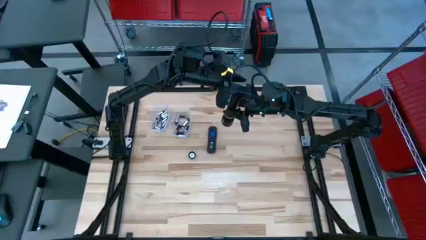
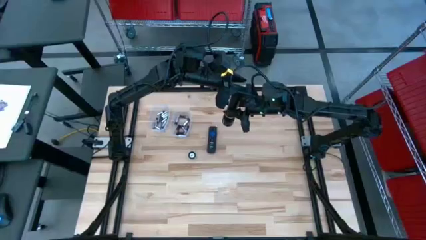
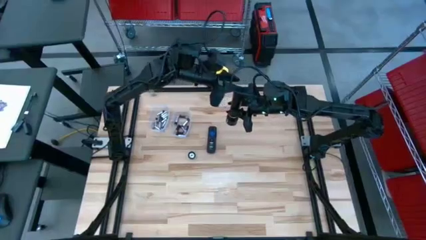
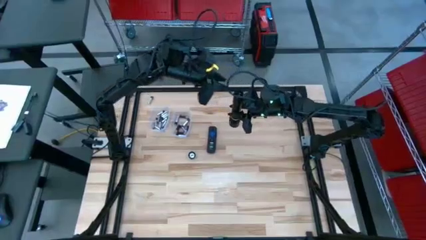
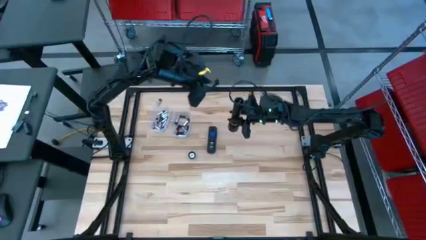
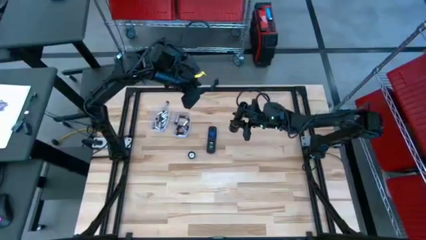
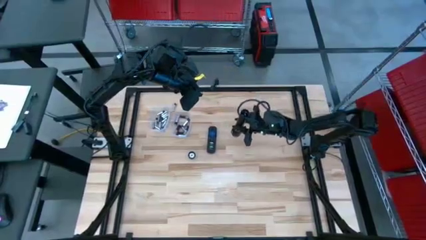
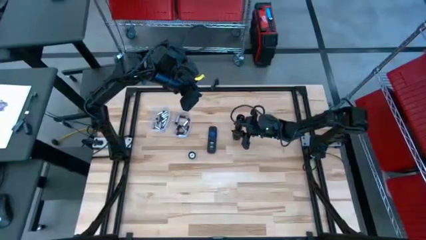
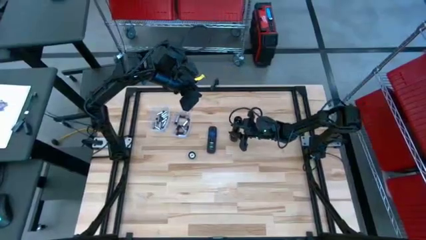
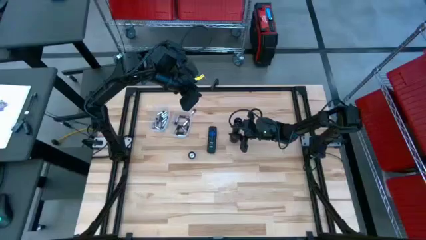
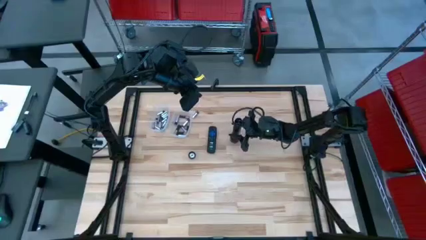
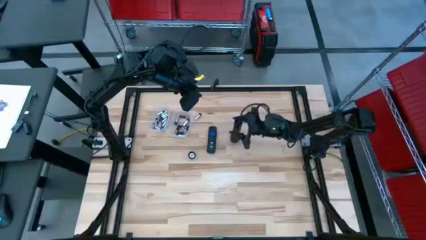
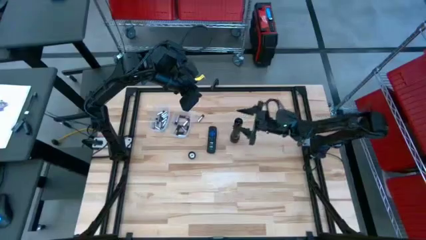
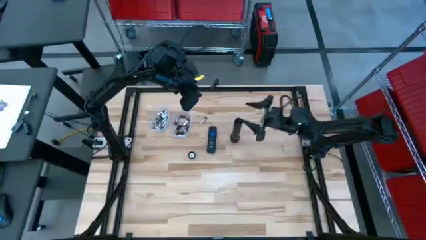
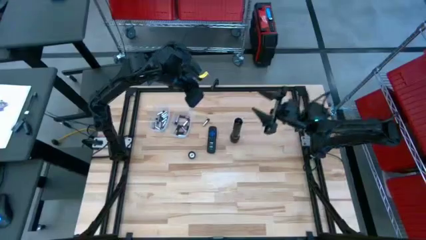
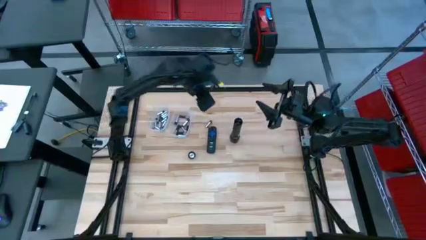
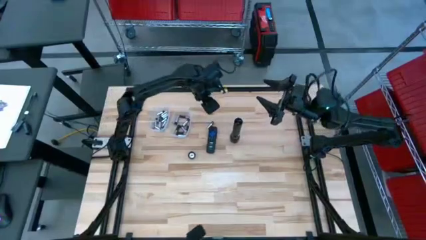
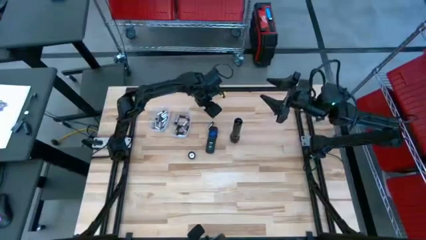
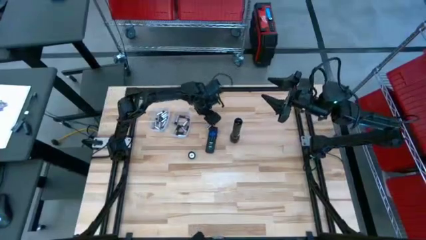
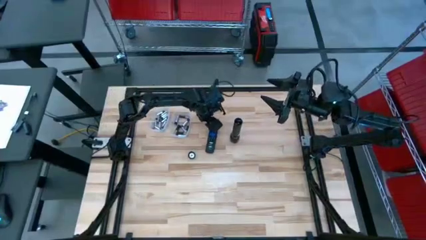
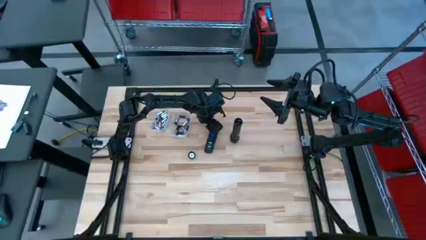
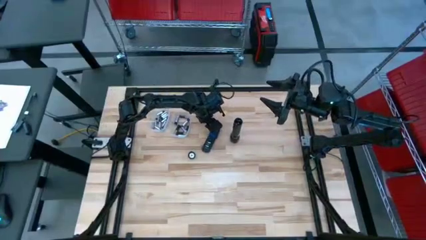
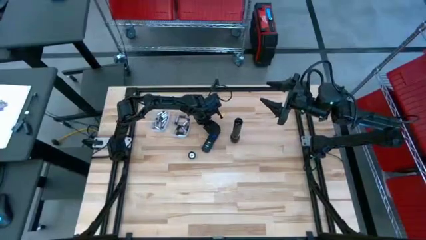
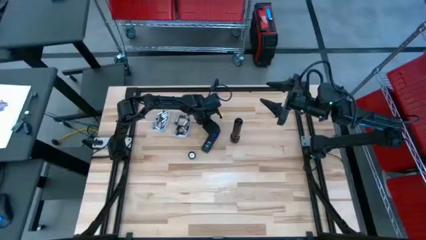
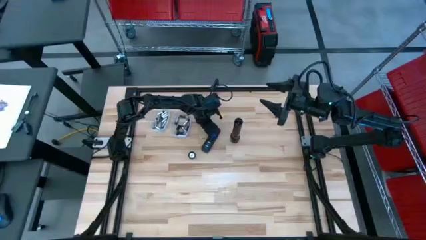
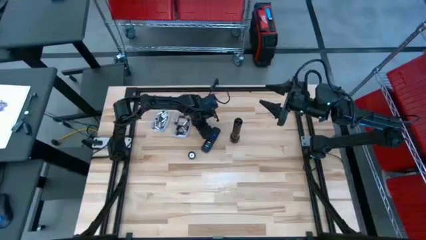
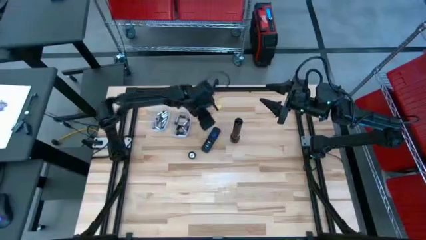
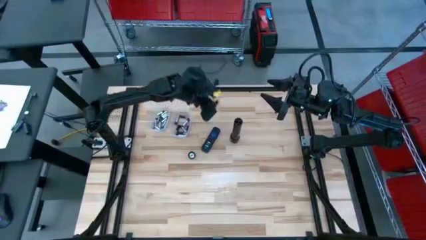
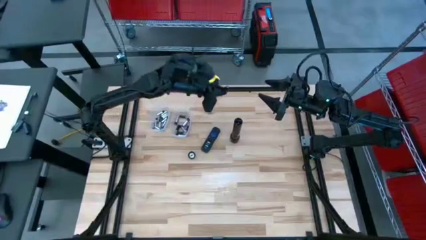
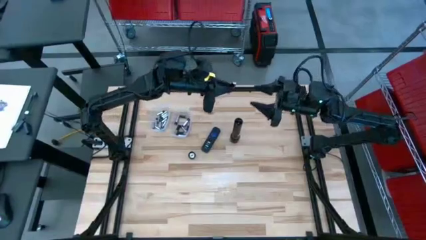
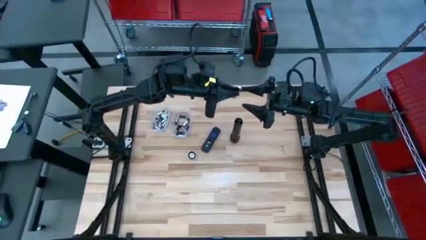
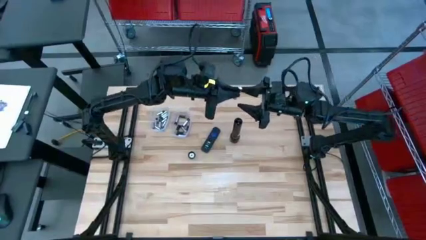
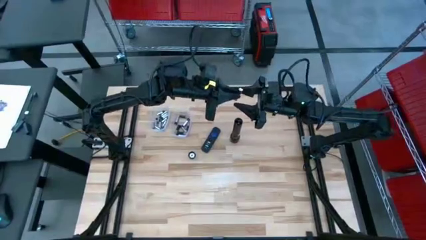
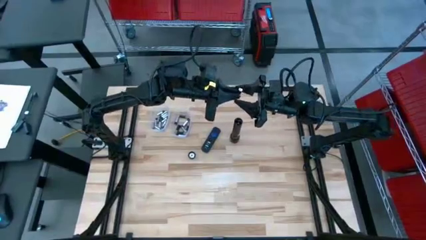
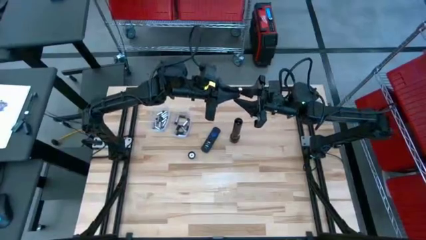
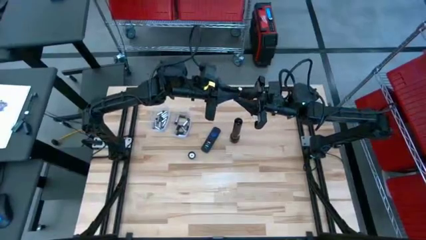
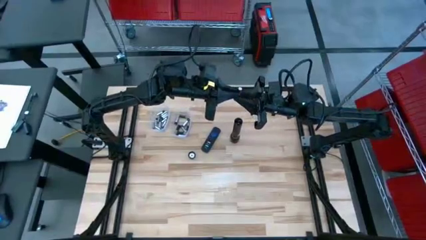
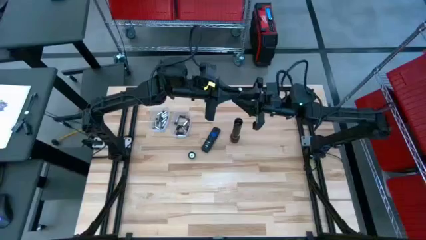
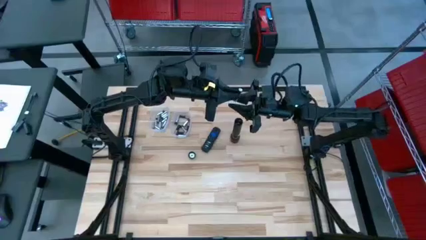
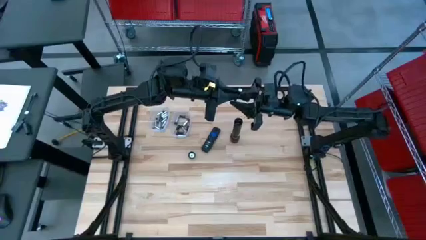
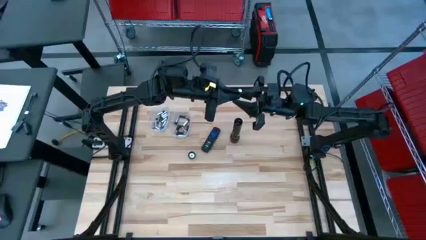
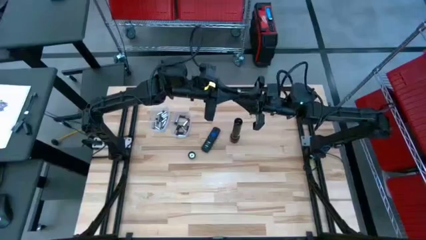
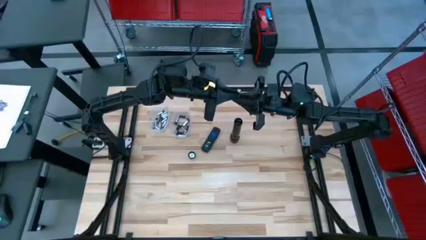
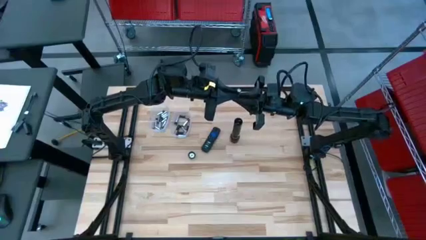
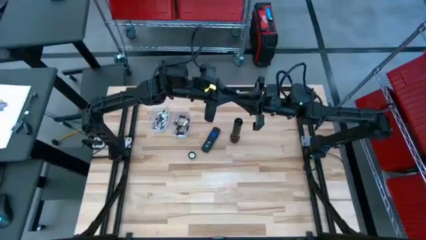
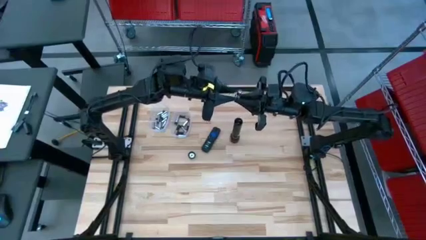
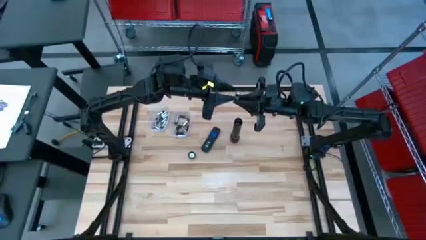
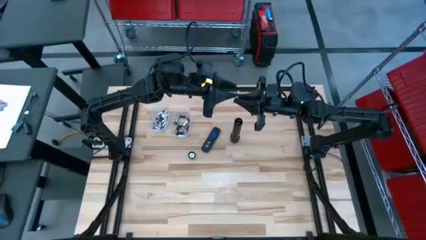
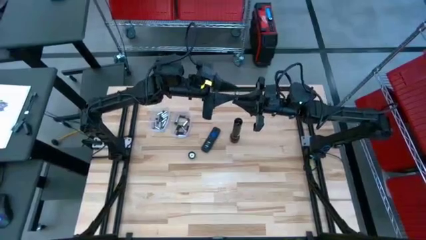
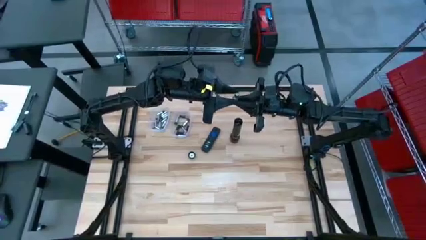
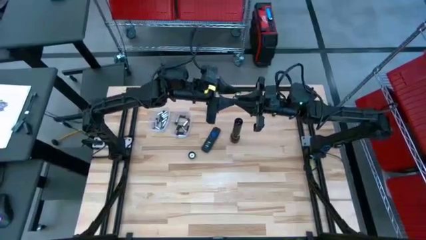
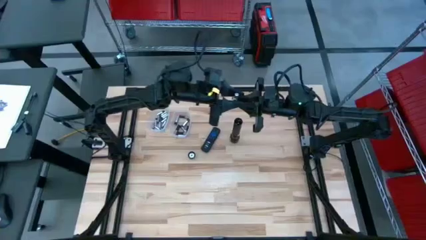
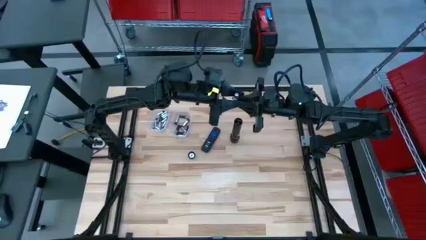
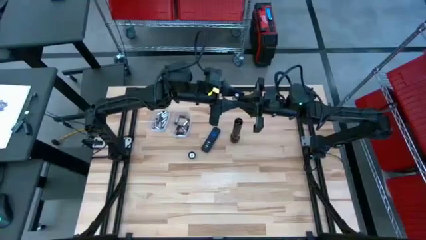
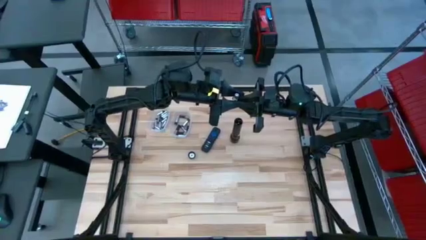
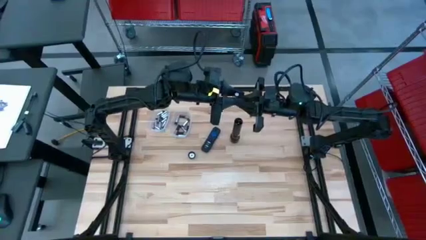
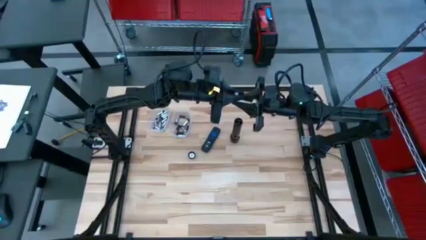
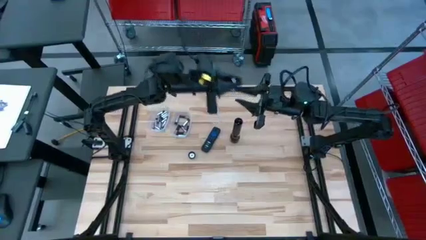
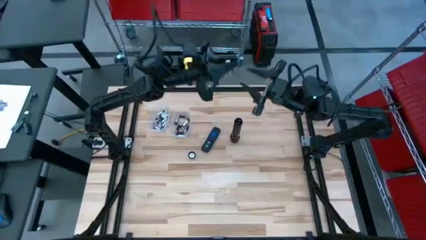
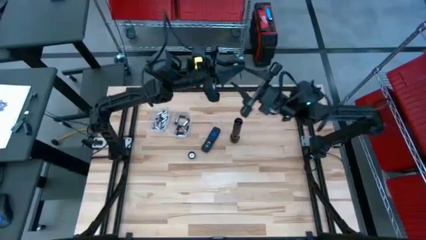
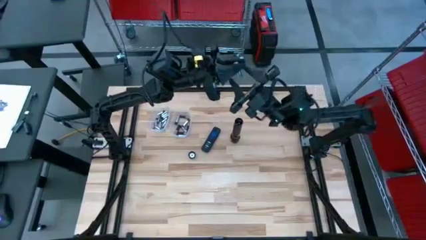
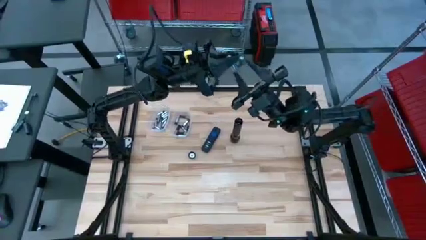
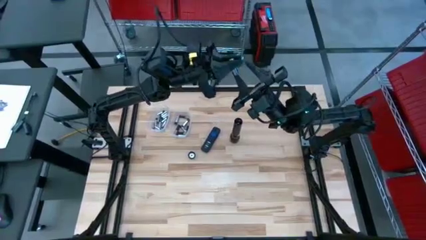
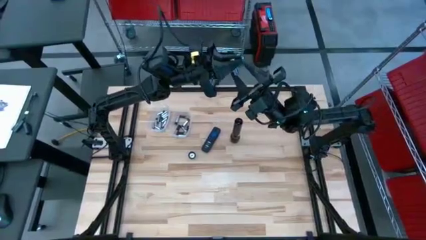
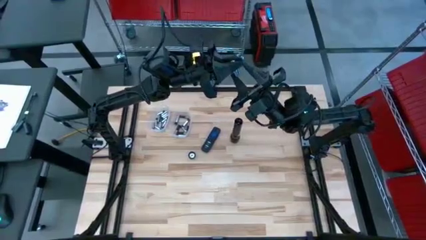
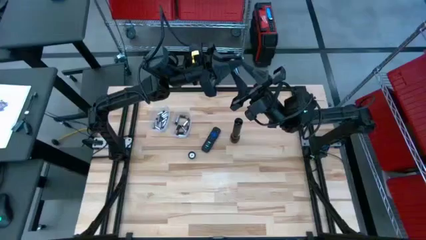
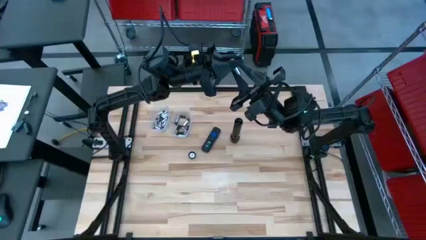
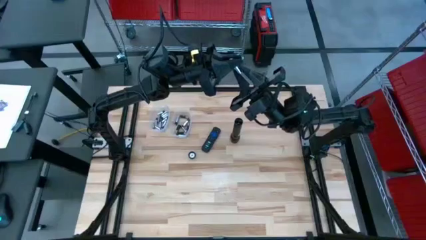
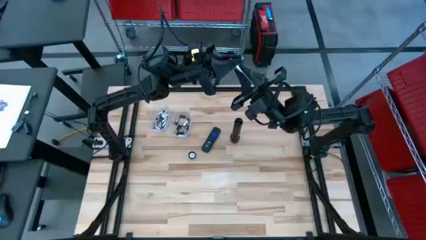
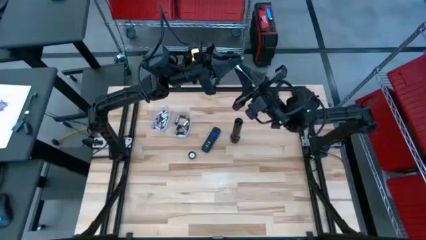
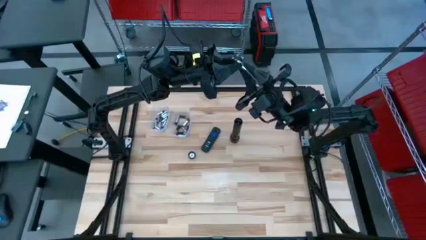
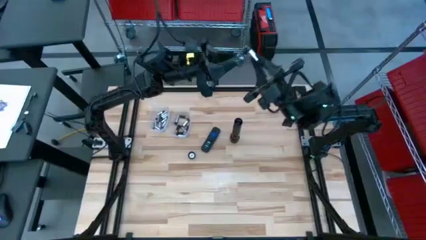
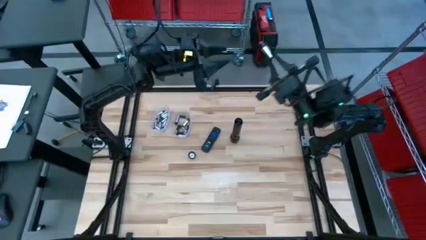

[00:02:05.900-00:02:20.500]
Task: Insert battery
Insert the silver battery into the flashlight battery compartment

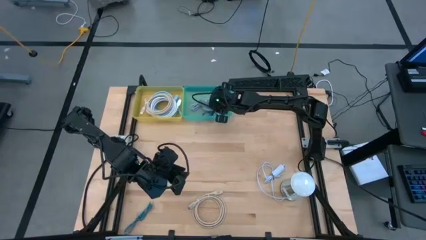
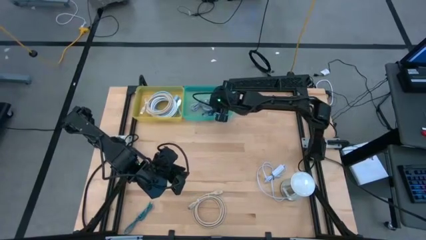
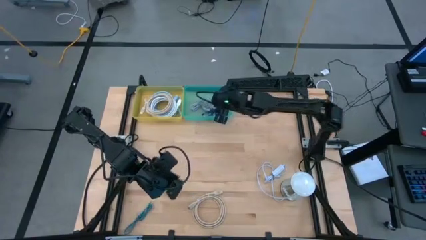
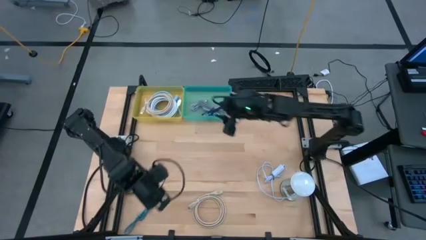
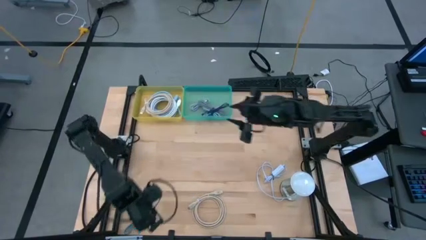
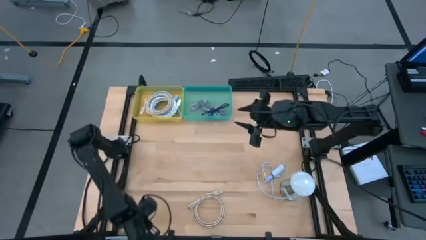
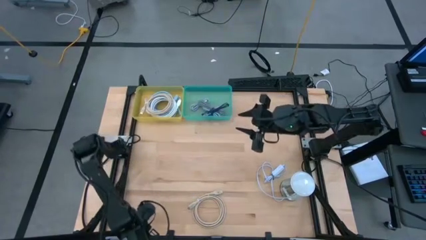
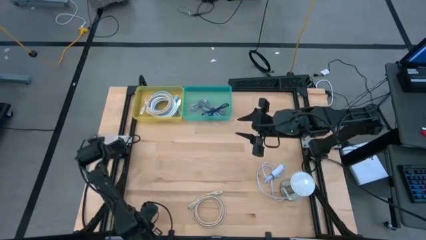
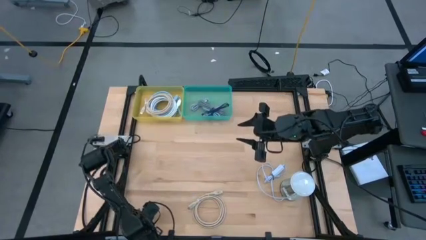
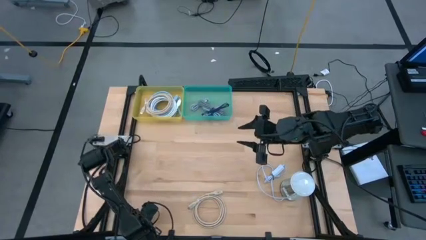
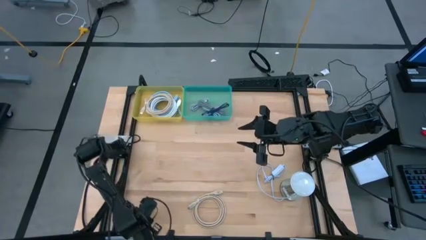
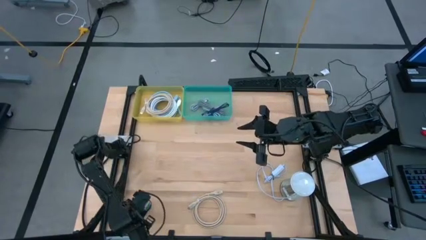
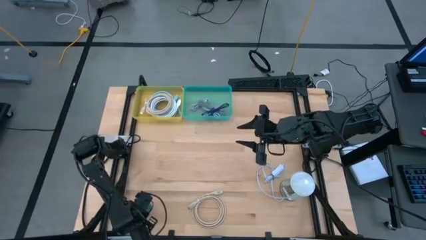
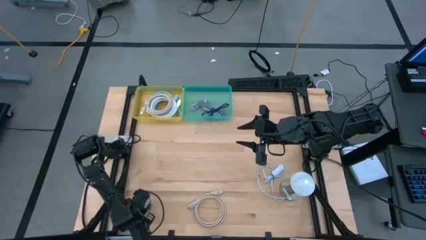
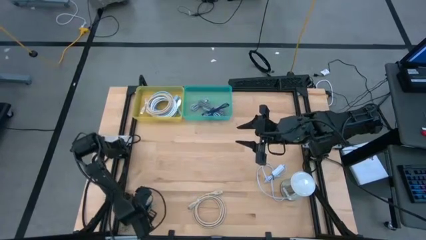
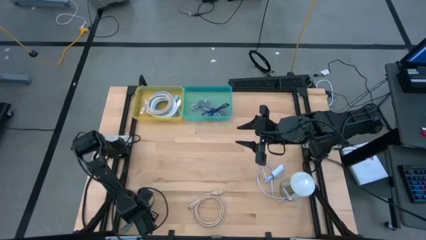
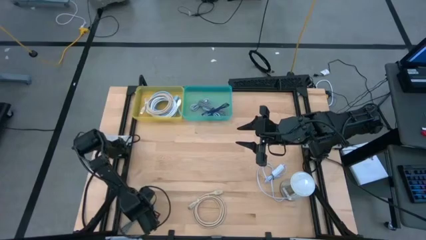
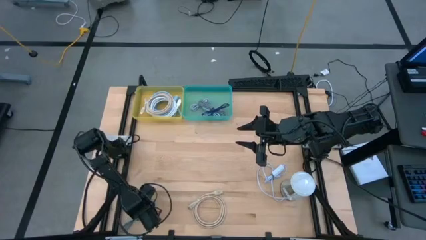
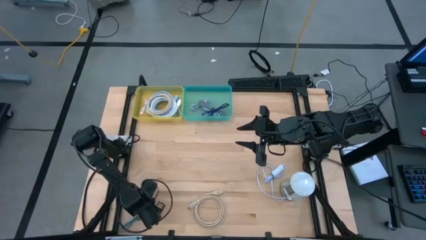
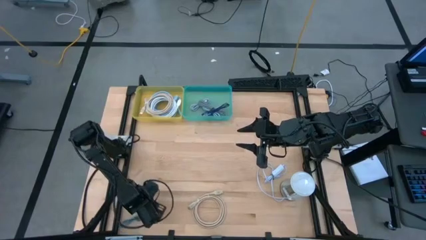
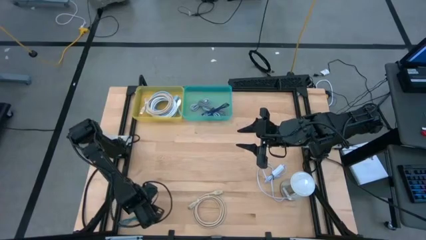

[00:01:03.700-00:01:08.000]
Task: Pick & Place USB Port
Put the blue charger cable into the green bin
